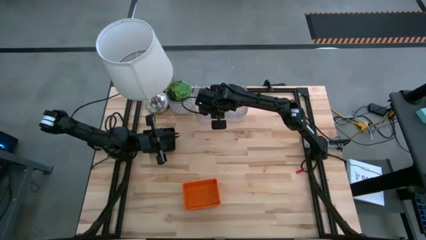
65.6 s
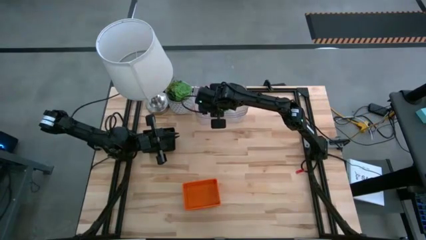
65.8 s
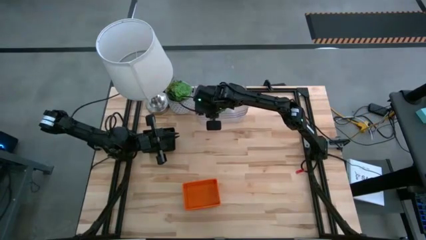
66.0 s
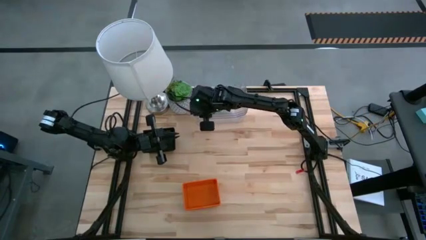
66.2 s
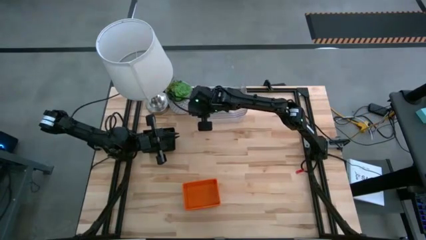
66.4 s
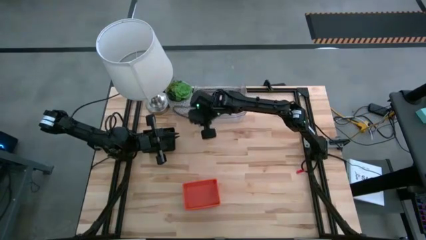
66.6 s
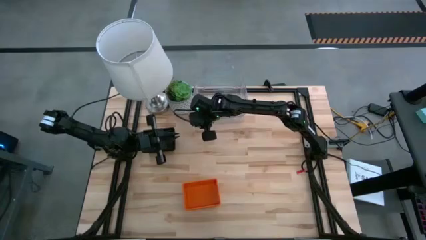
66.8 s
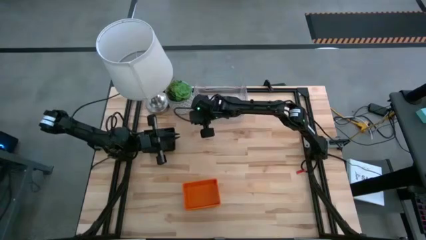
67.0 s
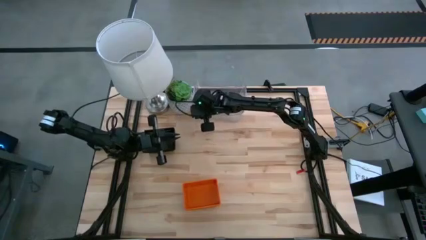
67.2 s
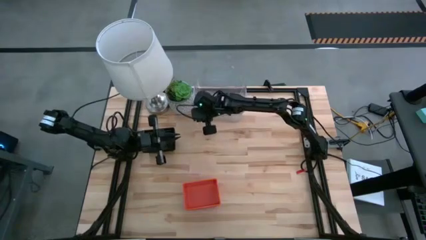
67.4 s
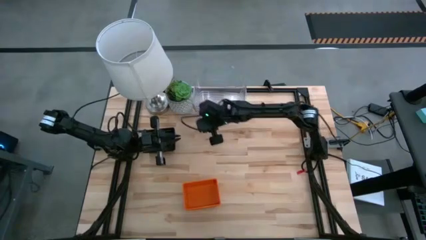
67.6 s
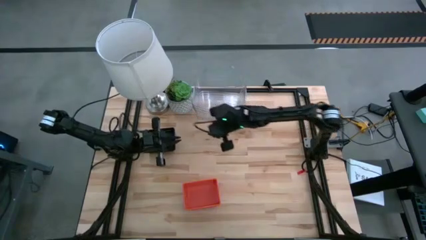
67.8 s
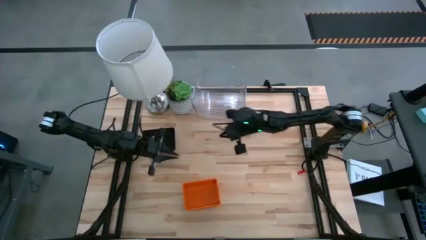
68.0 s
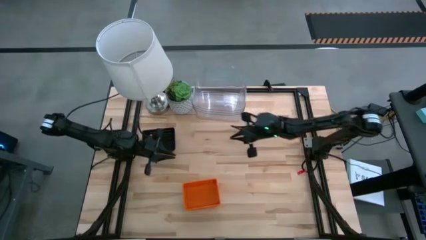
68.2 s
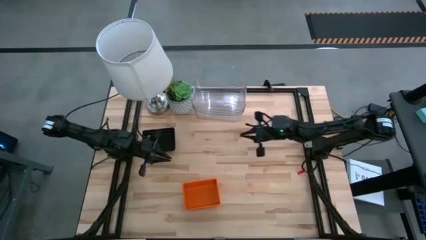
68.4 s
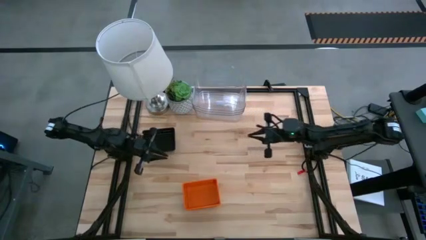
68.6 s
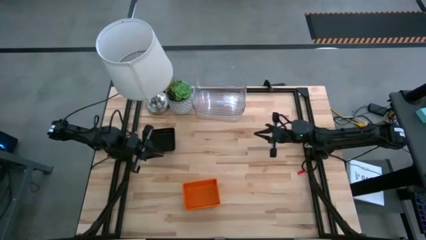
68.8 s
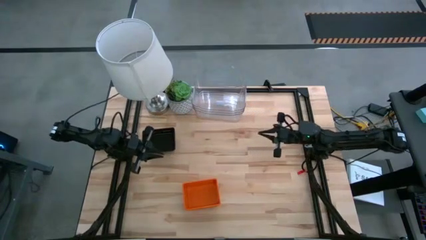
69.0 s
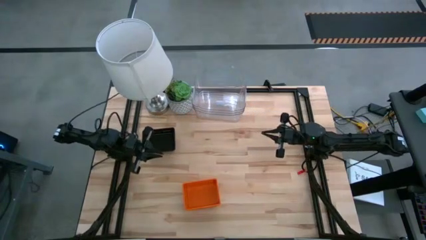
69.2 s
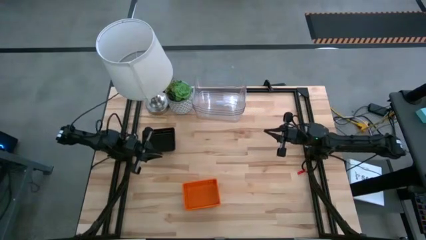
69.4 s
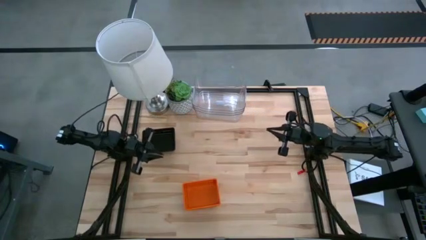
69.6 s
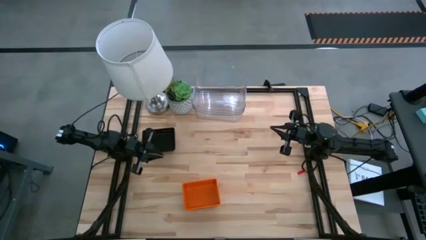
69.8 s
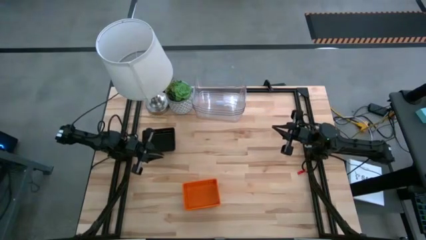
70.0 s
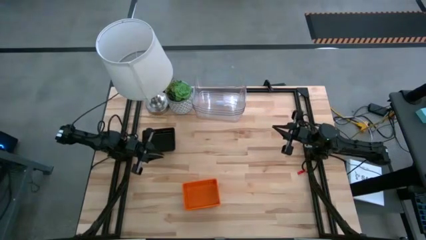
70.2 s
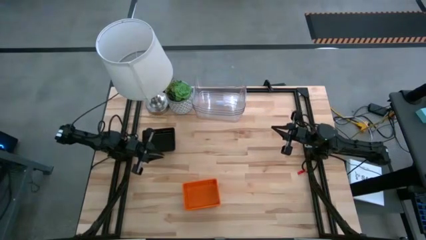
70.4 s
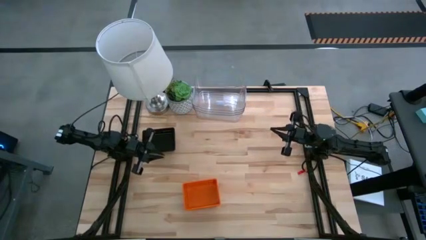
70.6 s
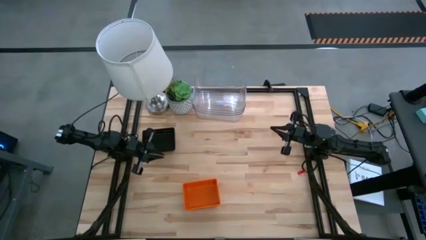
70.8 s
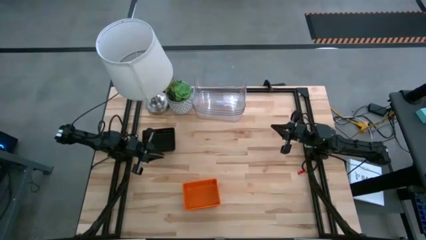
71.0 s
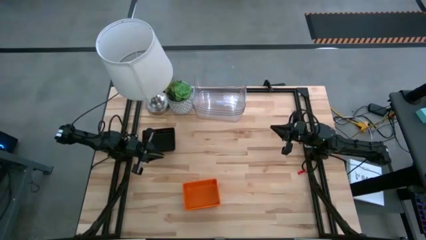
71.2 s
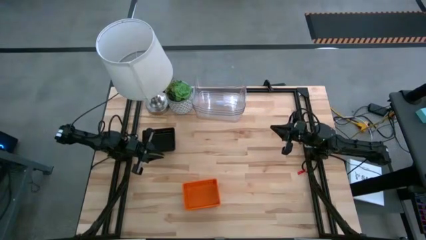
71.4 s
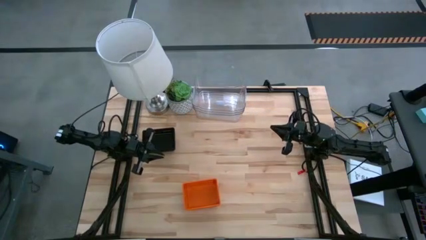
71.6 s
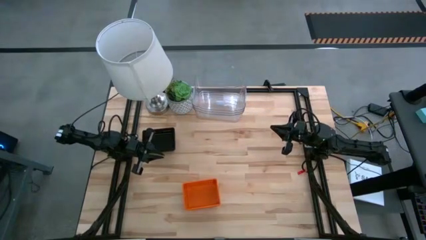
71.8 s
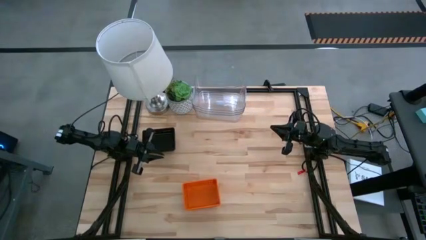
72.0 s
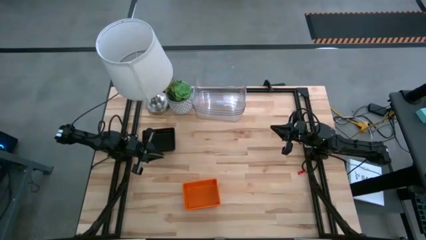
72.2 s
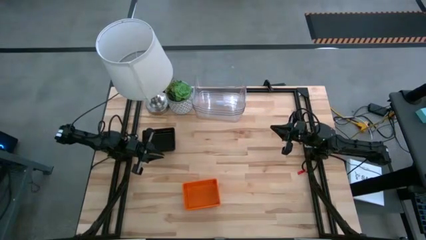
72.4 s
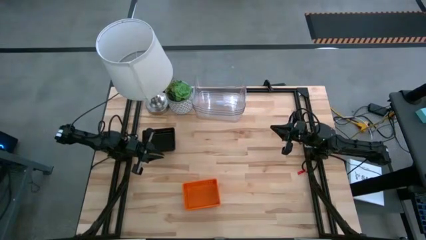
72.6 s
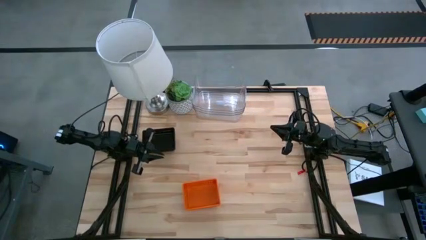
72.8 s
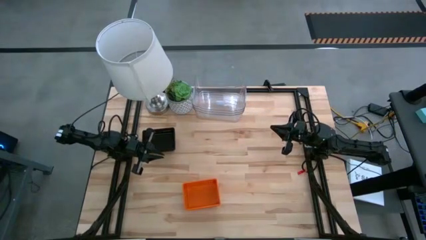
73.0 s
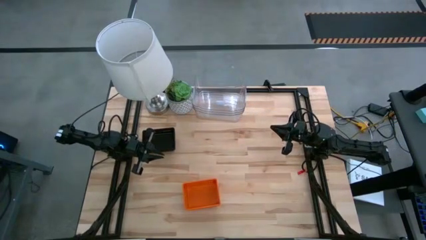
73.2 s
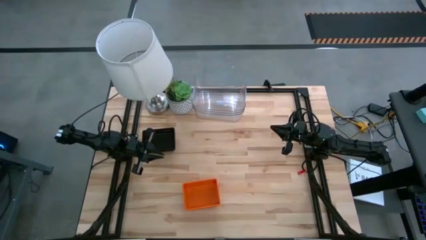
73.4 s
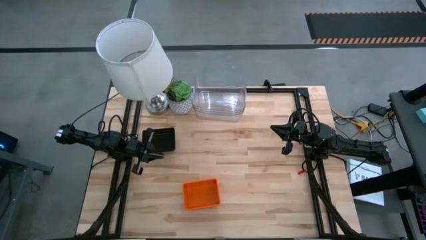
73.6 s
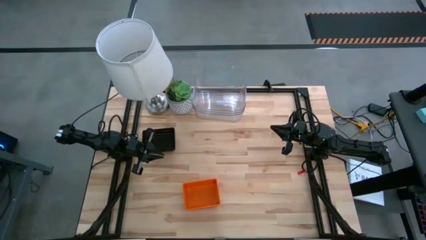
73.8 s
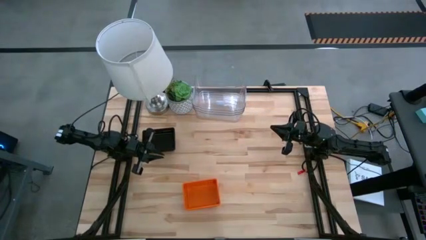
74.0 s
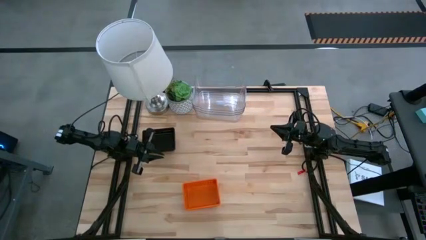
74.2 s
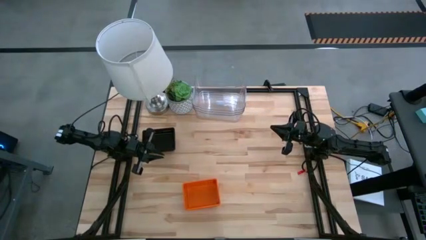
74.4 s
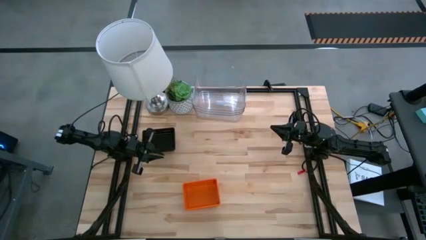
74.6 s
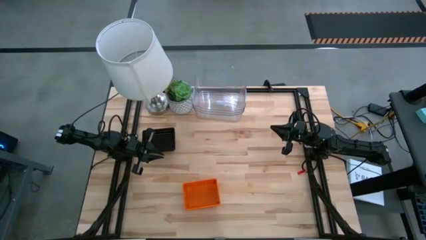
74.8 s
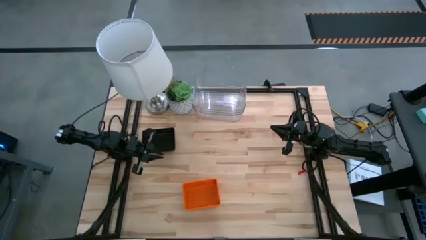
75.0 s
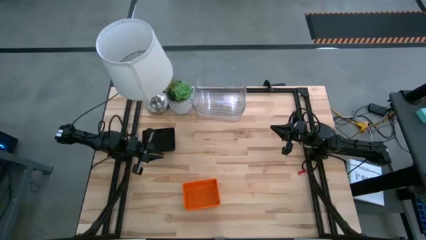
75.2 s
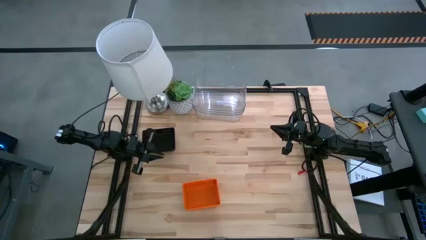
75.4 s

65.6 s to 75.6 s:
Return to Home Position

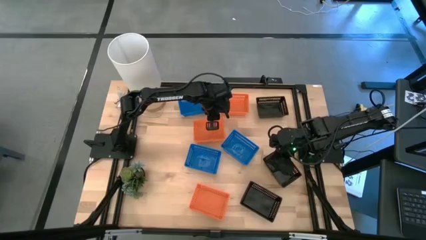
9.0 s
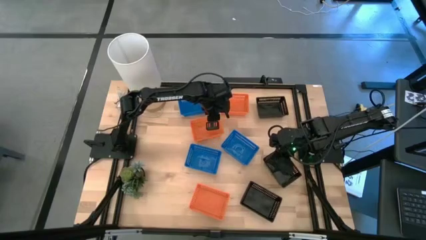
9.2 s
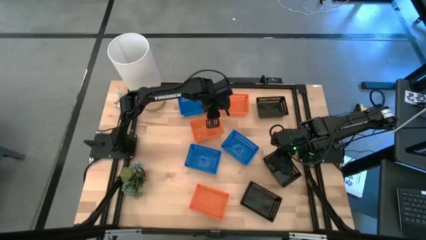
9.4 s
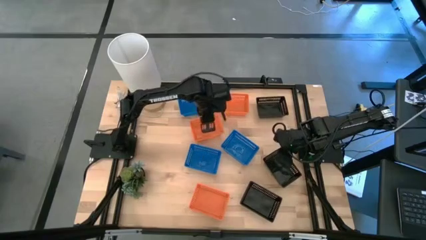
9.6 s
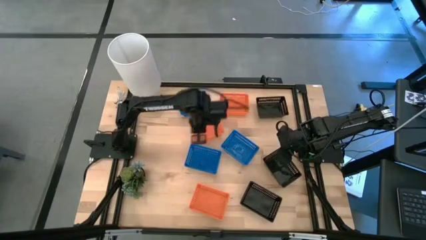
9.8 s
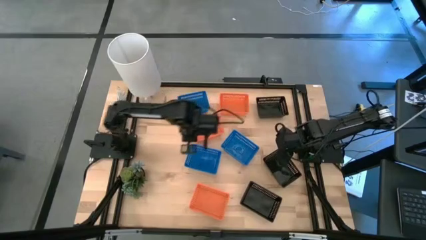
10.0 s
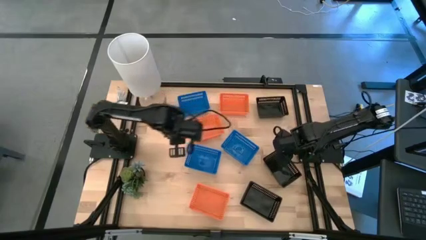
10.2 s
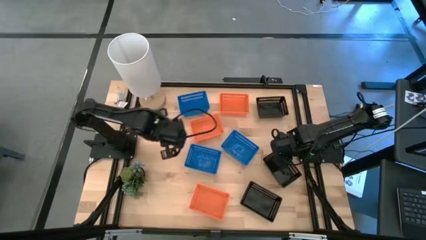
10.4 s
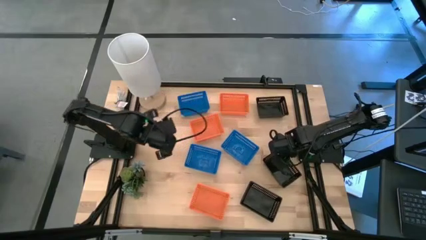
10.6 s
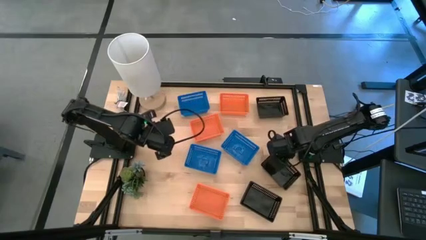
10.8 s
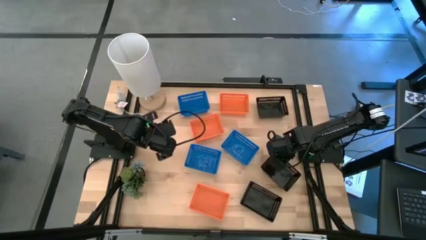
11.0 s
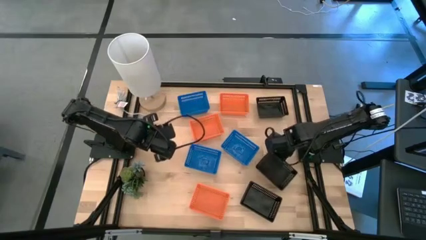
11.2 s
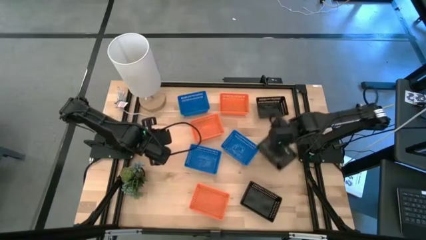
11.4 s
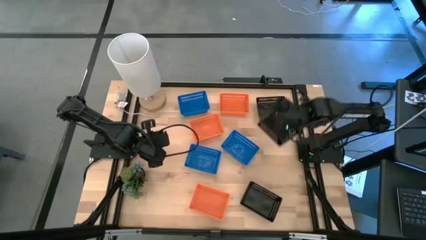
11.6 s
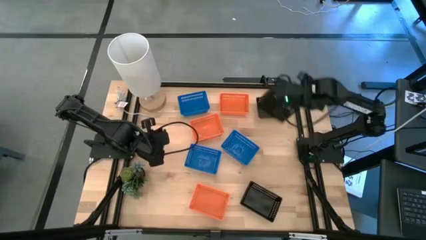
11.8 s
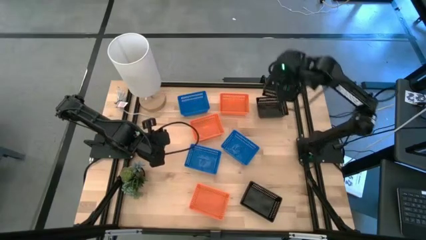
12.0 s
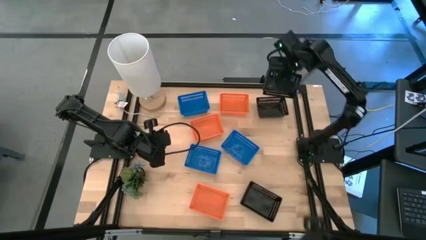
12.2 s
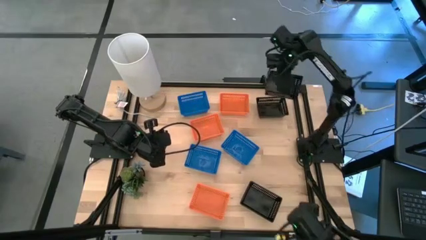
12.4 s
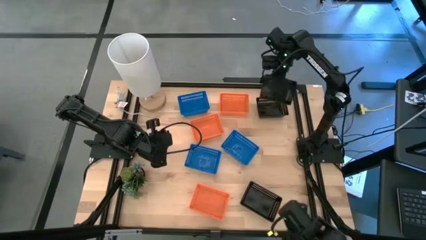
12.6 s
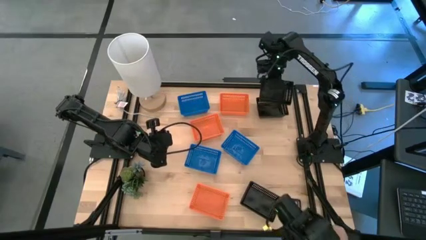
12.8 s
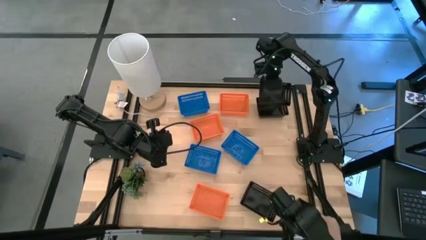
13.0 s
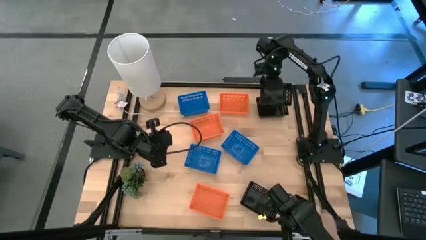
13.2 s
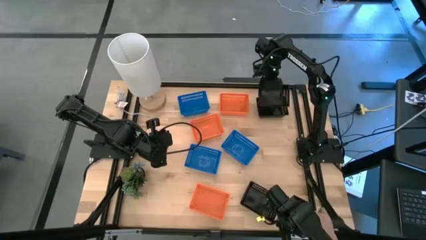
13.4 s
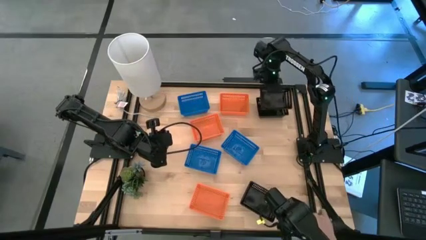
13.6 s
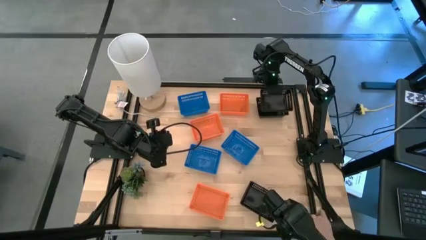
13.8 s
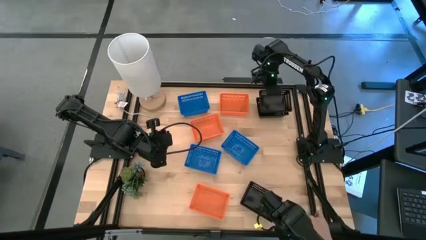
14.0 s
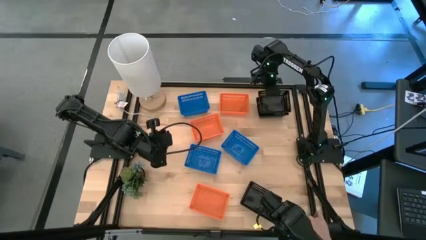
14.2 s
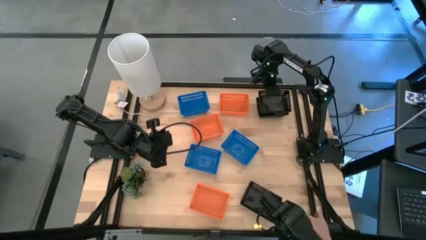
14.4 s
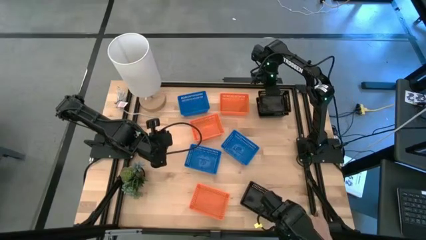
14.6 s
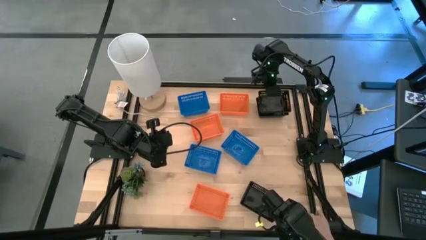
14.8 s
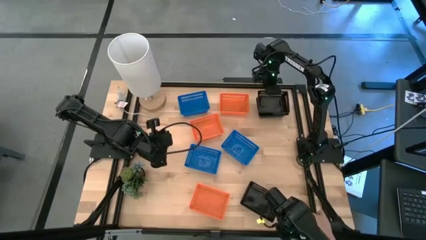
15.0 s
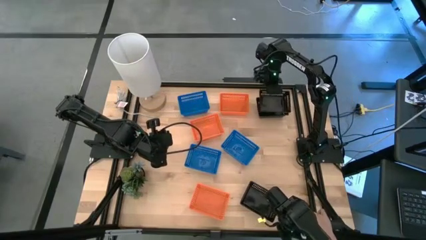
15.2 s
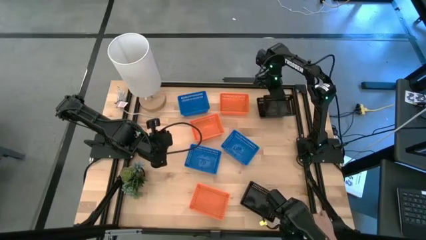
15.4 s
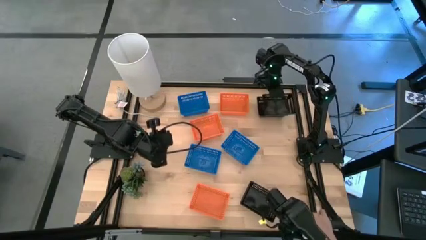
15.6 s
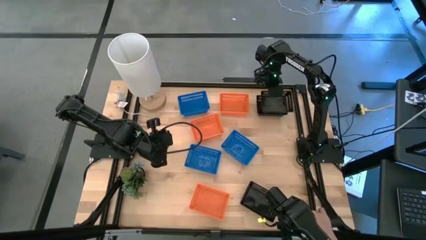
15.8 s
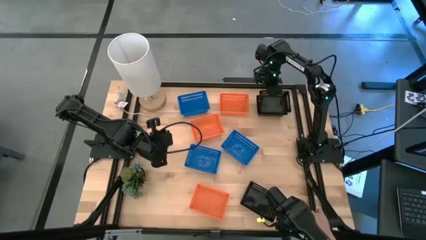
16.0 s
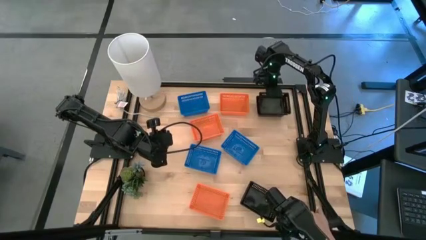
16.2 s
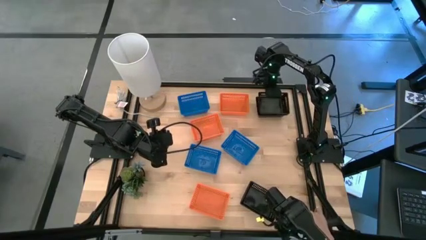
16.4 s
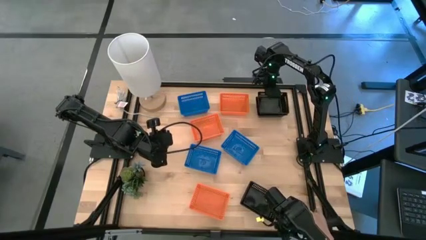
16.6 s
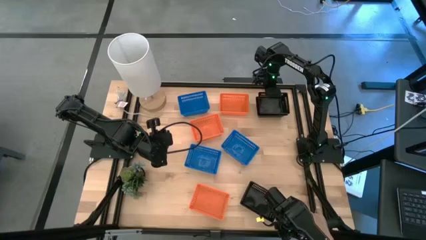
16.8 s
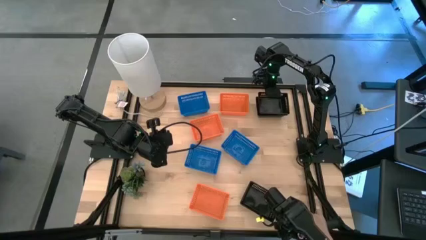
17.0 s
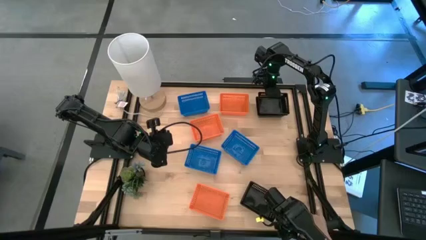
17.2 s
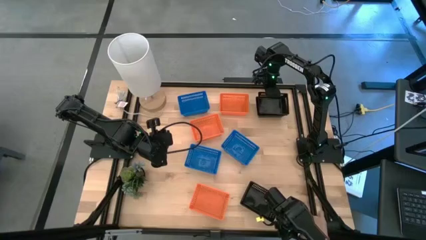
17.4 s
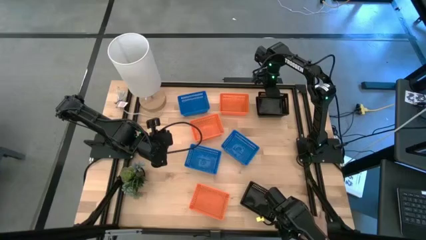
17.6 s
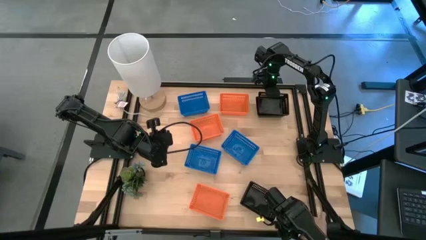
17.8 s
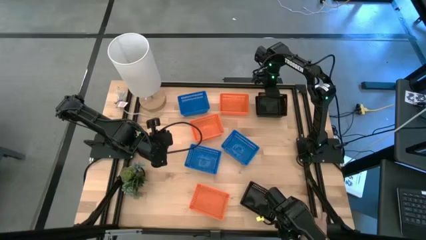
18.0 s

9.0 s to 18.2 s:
Stack the middle black bin on top of the top black bin
